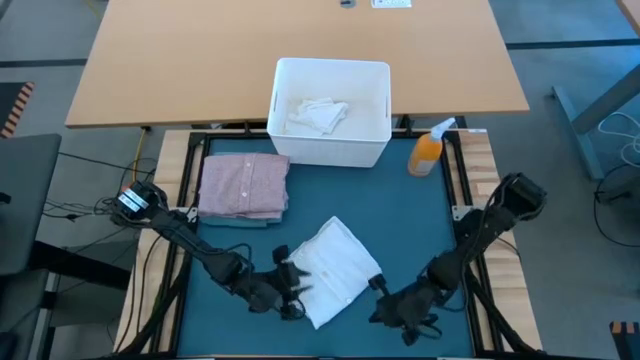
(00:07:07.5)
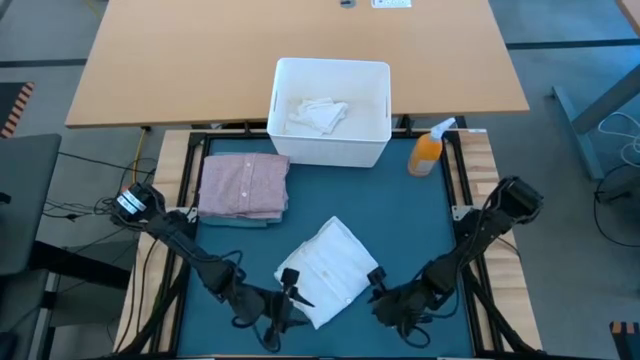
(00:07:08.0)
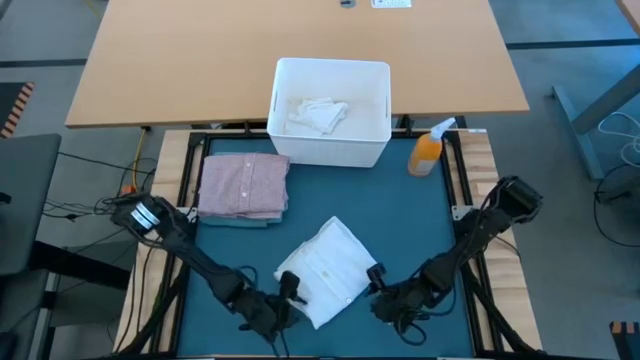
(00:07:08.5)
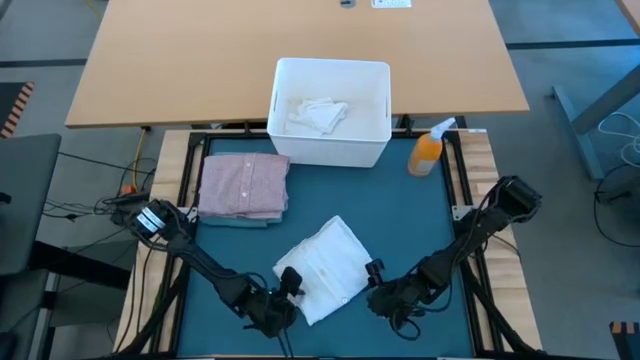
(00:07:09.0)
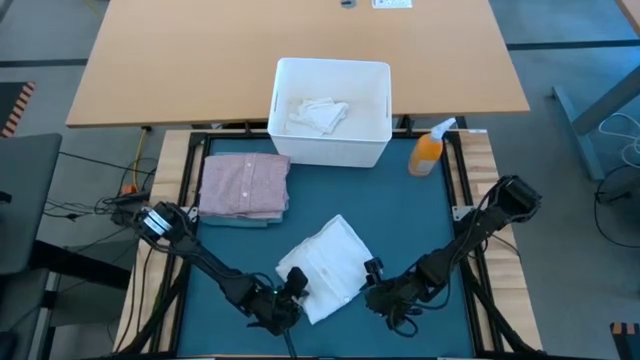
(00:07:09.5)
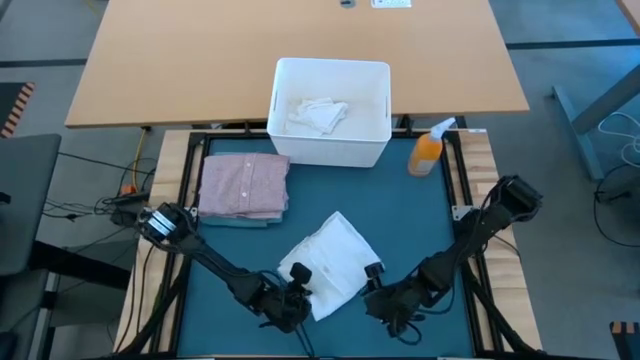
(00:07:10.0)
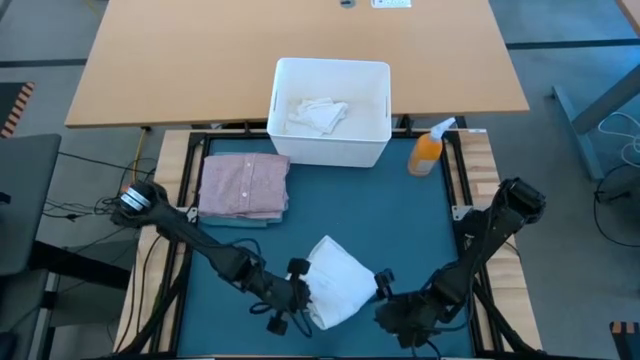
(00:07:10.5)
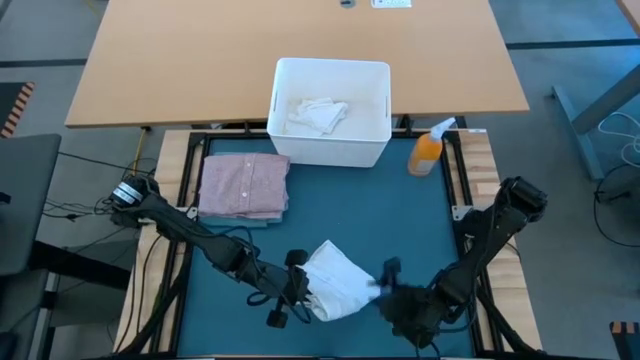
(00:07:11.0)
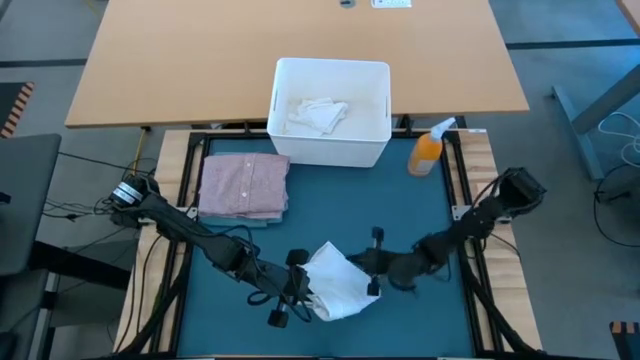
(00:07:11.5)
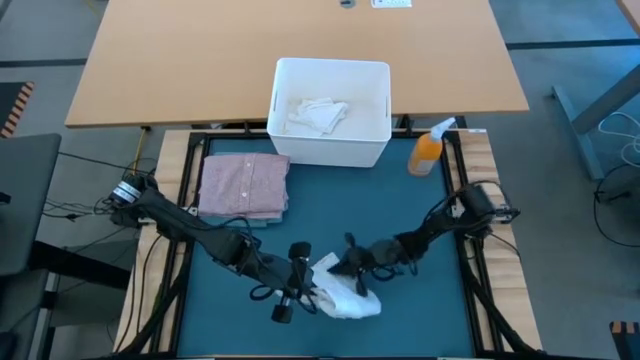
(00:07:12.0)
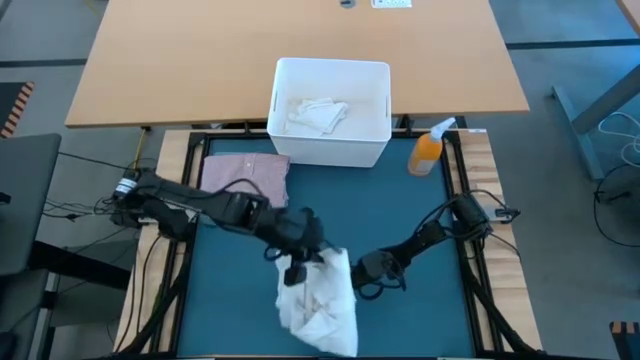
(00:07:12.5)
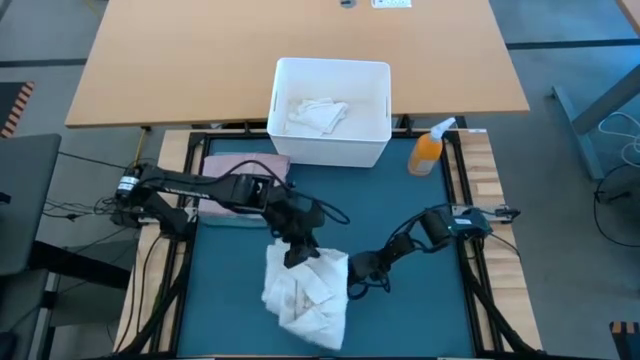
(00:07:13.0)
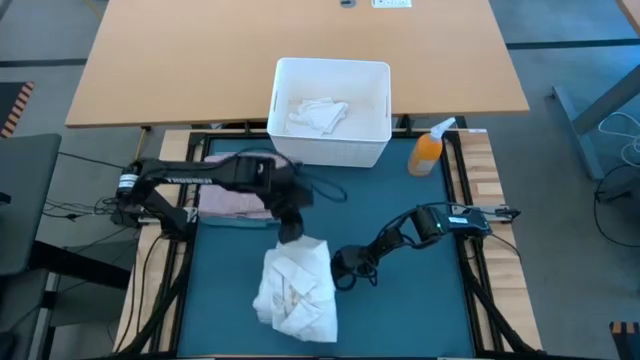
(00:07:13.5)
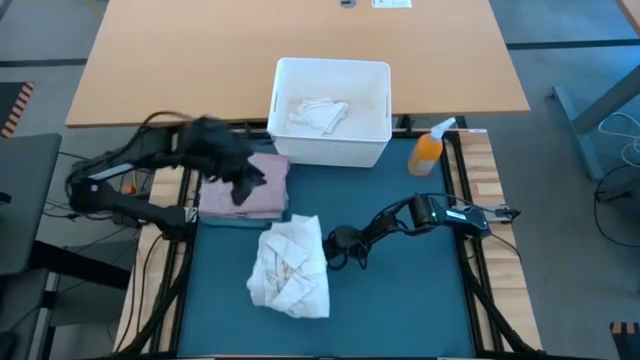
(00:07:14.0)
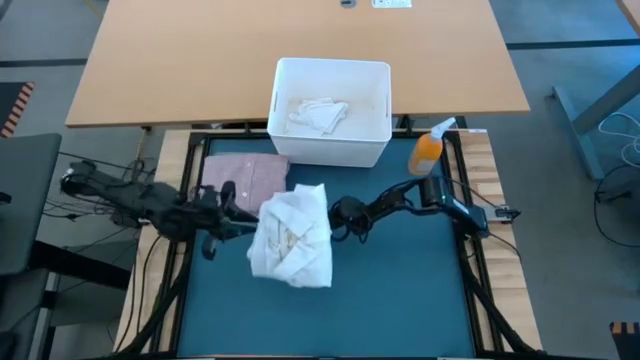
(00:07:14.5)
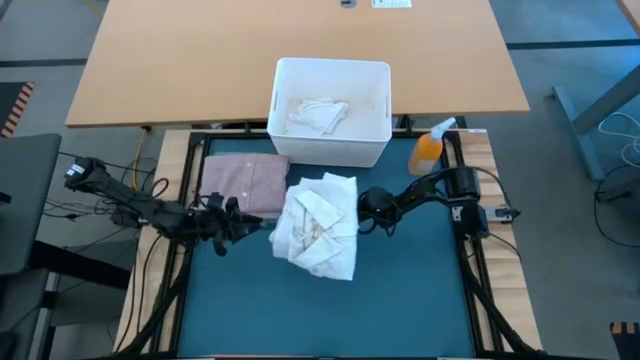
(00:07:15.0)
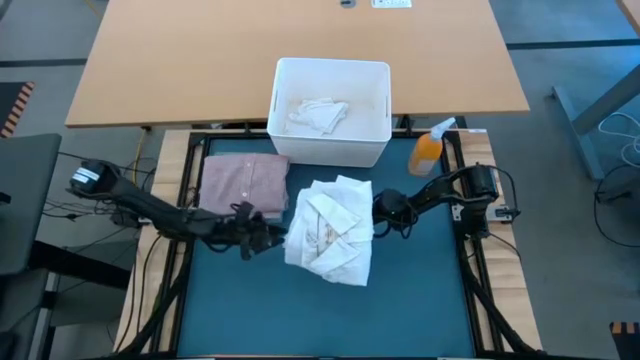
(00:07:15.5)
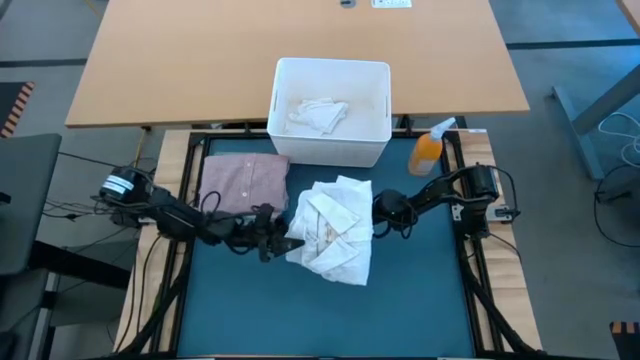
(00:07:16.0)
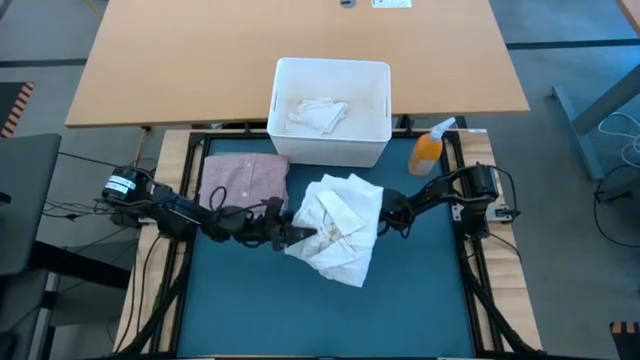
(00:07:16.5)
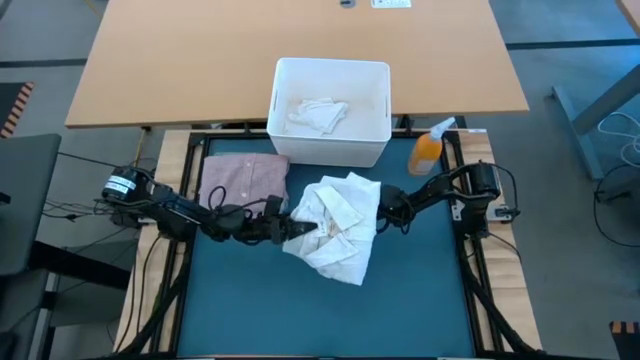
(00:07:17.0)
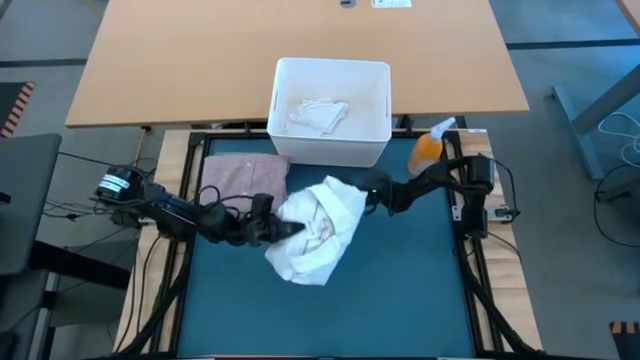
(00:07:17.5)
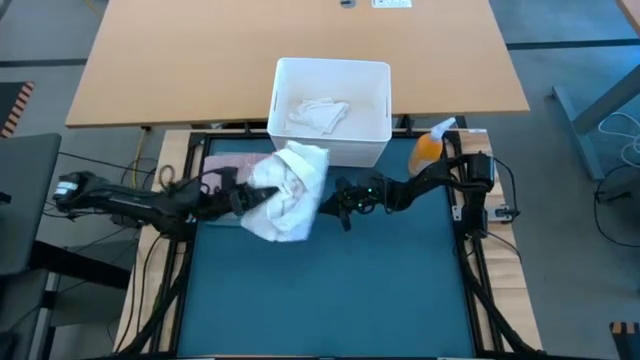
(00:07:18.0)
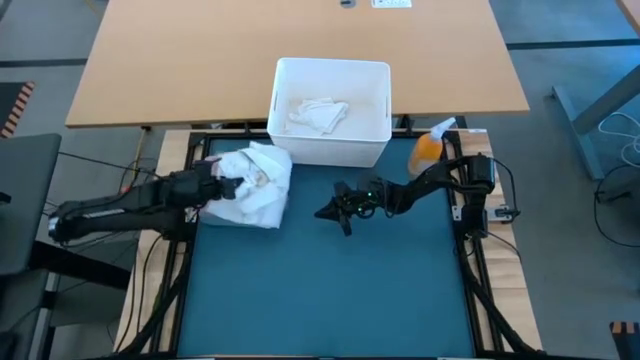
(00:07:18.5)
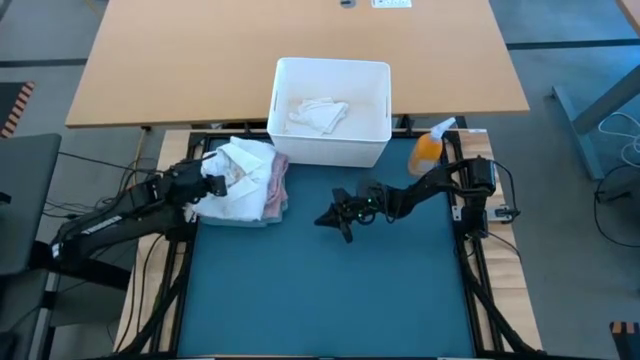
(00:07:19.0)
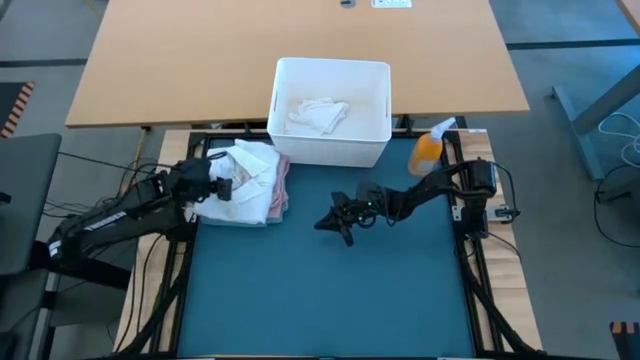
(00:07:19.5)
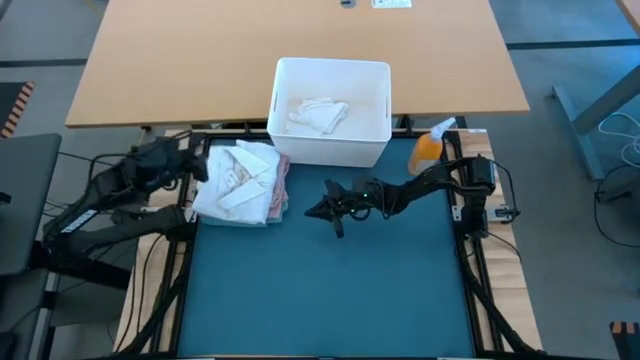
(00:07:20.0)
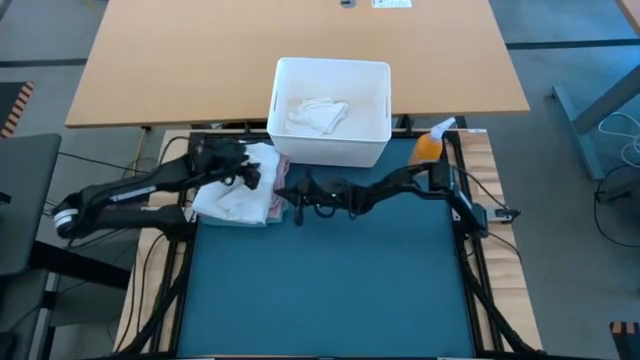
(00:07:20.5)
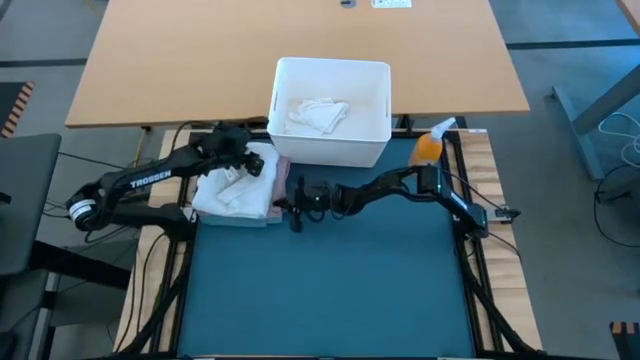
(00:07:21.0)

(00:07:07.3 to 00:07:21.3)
Task: Fold Laundry from Bin
Stack the white polo on top of the pink shirt

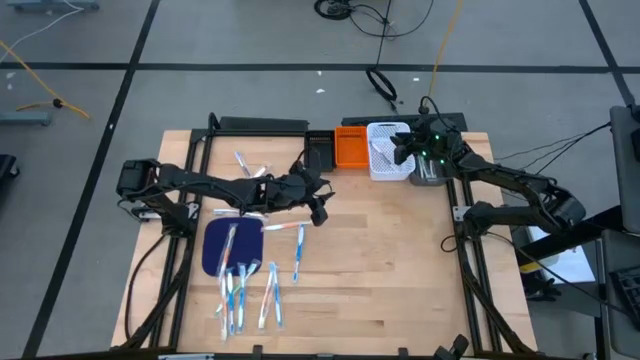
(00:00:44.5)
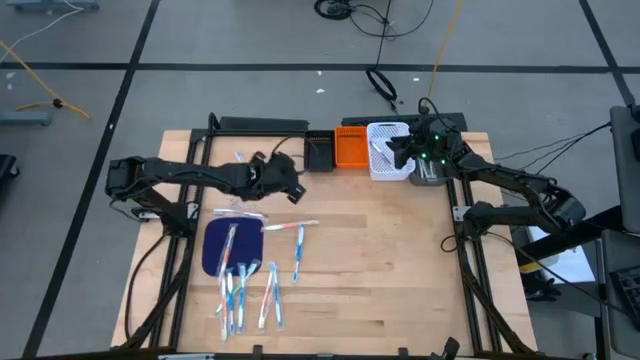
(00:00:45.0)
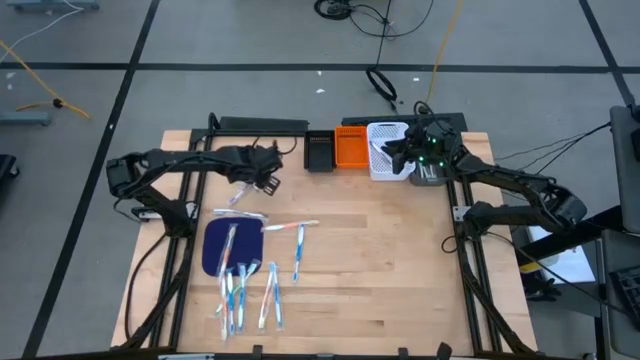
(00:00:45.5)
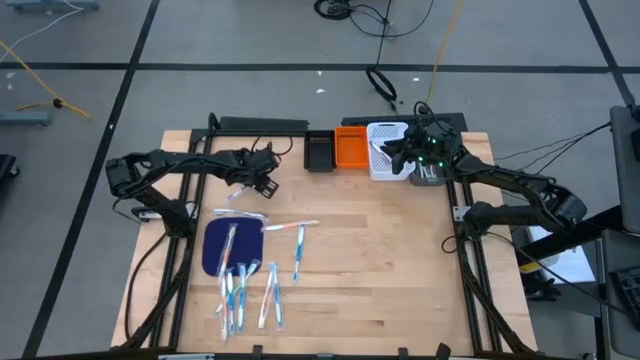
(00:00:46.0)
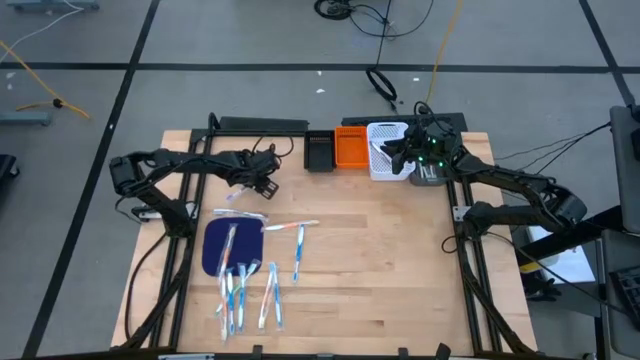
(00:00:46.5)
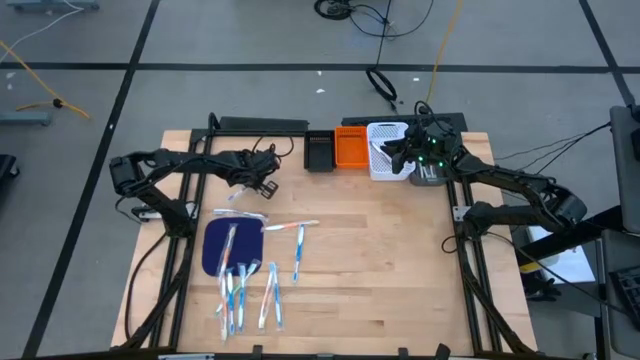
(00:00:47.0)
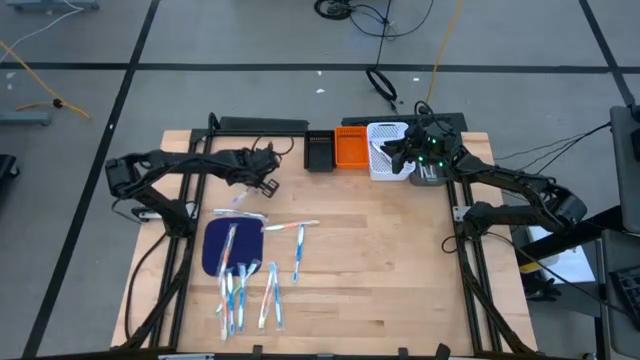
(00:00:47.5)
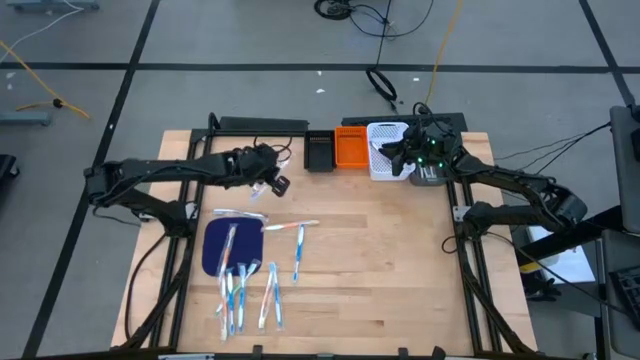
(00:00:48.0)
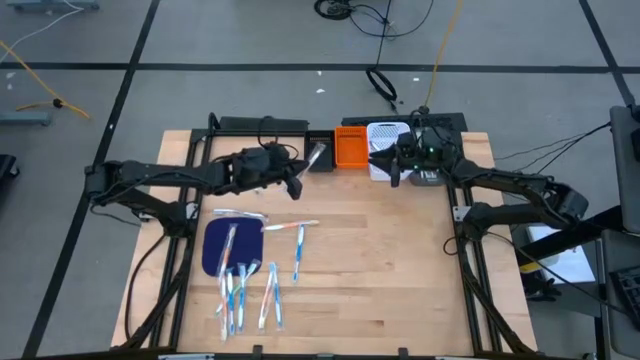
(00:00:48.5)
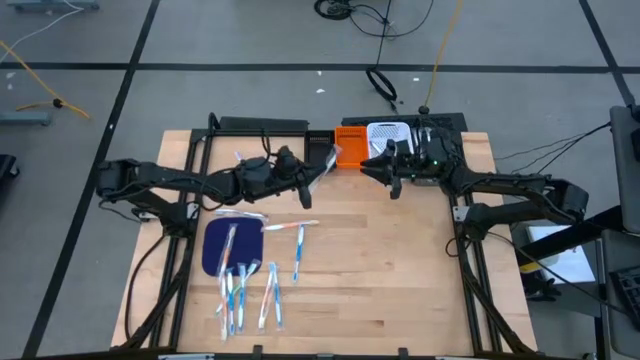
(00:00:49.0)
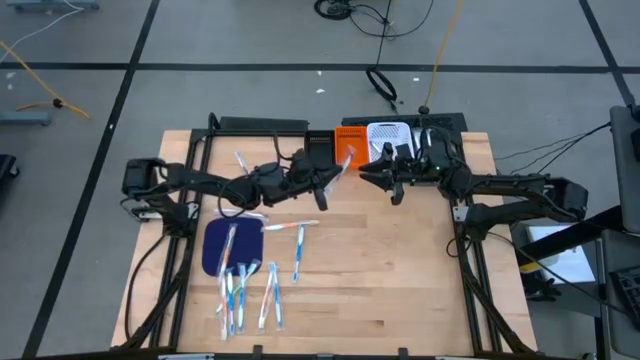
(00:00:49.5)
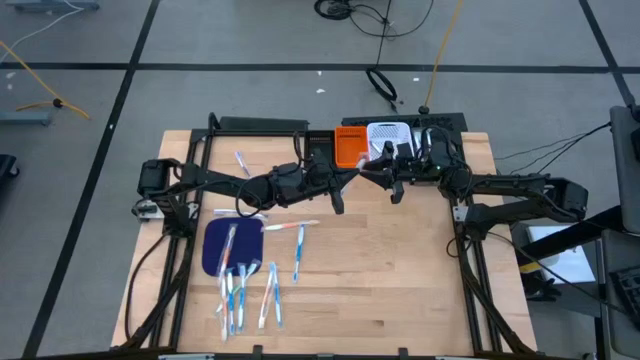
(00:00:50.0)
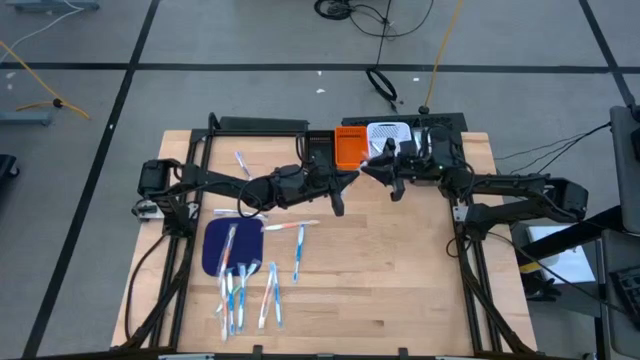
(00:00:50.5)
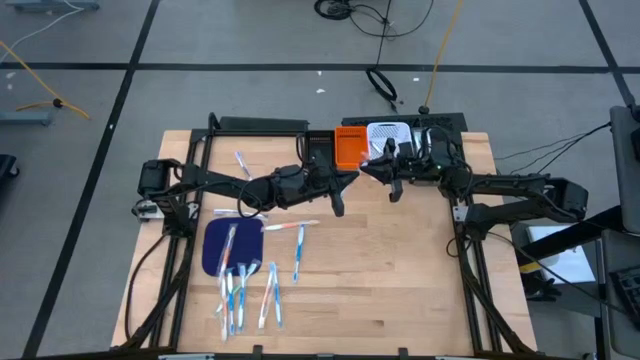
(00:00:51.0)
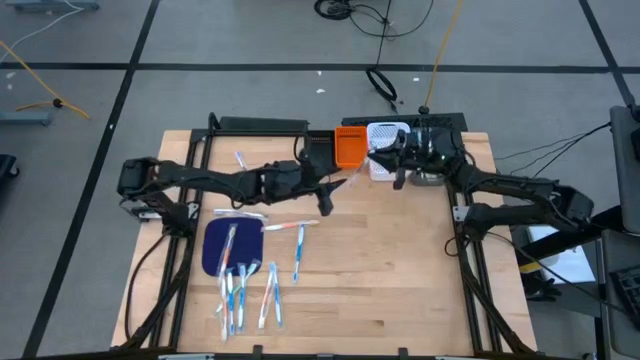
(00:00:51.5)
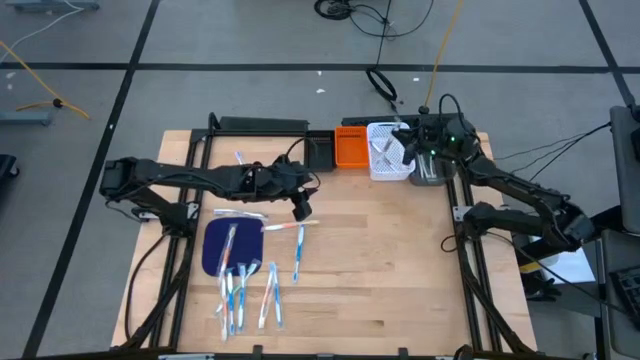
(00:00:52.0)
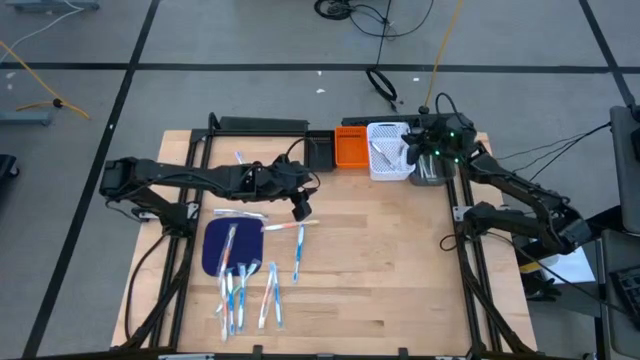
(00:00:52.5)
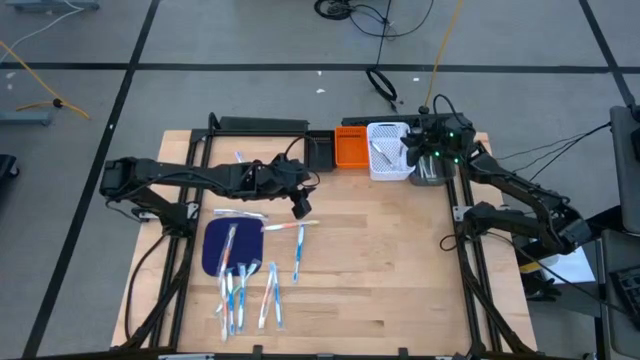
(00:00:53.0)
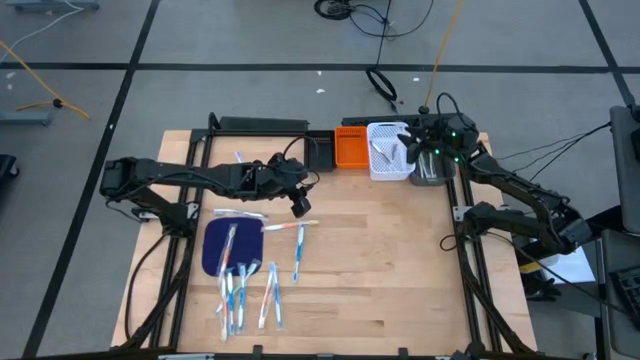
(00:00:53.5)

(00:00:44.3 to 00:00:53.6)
Task: Pick & Place Toothbrushes
Put the purple toothbrush into the white bin
